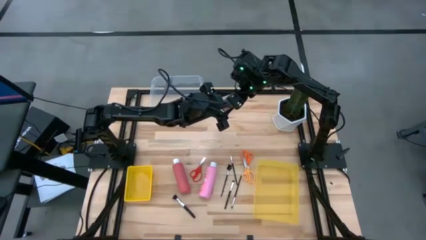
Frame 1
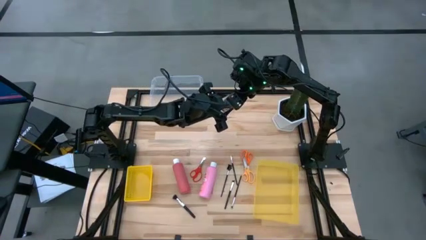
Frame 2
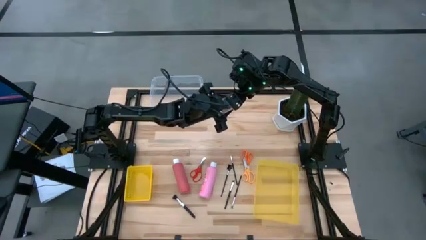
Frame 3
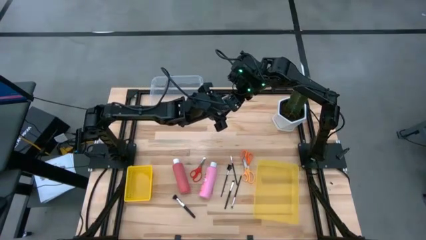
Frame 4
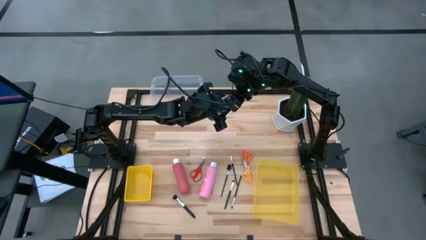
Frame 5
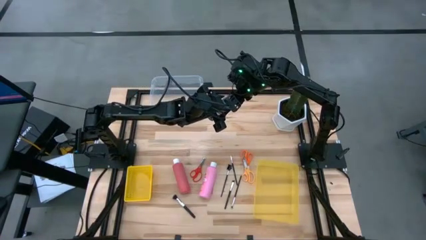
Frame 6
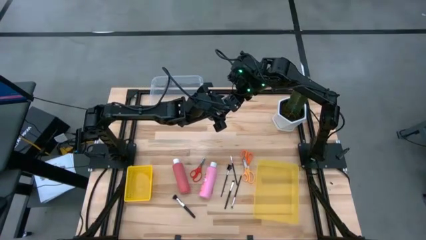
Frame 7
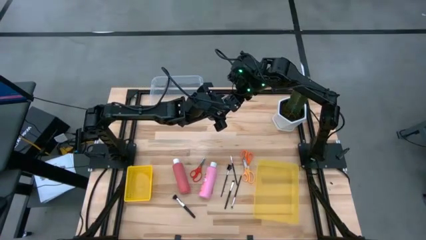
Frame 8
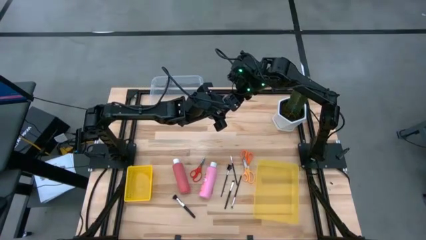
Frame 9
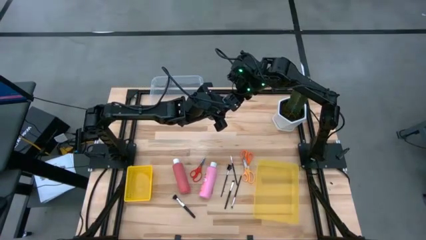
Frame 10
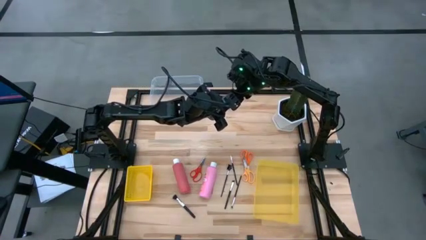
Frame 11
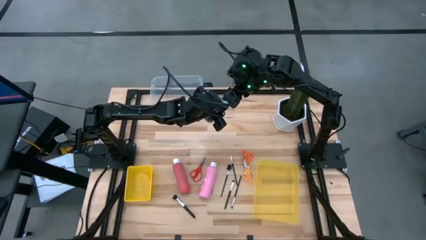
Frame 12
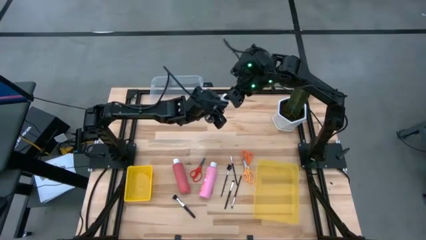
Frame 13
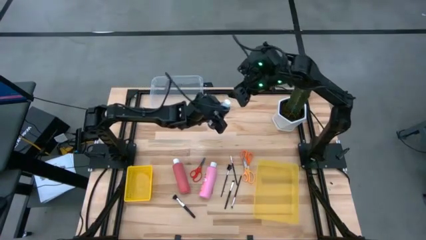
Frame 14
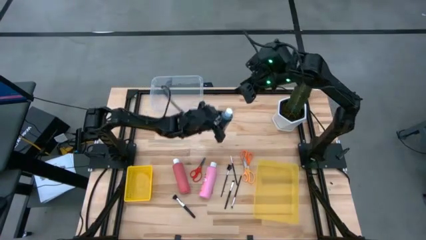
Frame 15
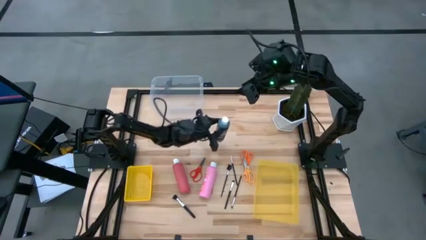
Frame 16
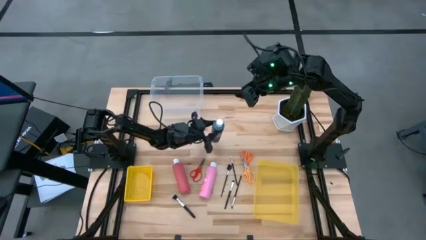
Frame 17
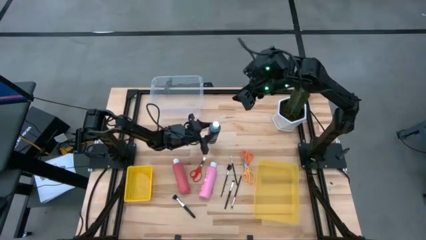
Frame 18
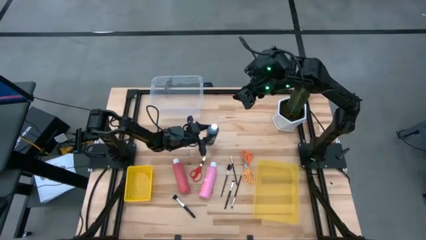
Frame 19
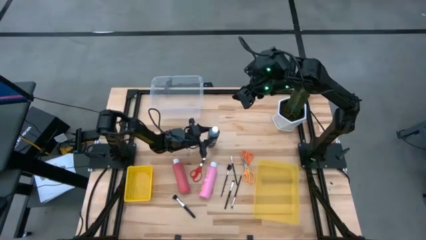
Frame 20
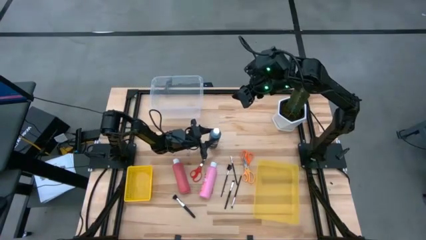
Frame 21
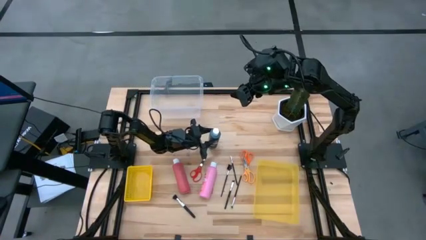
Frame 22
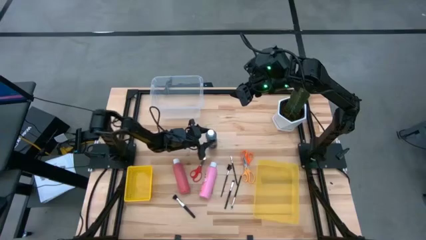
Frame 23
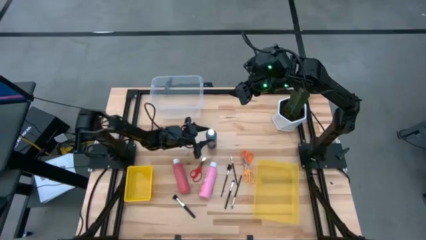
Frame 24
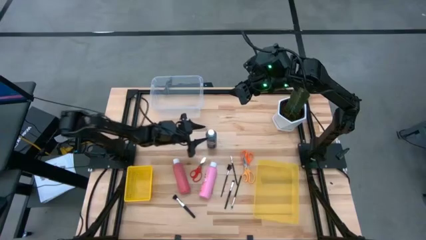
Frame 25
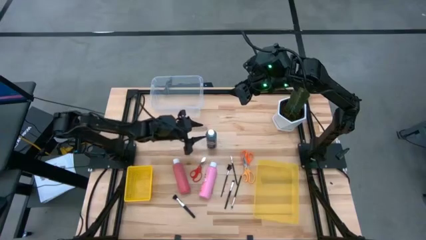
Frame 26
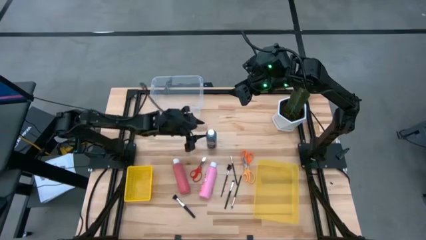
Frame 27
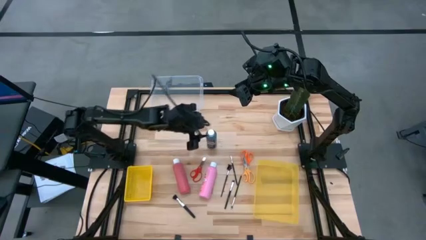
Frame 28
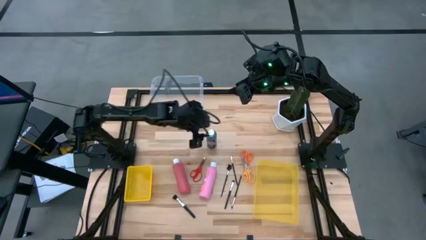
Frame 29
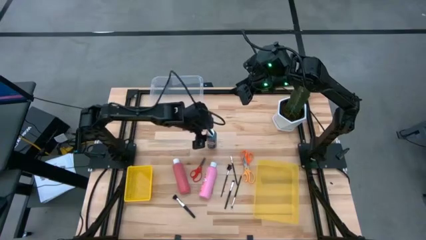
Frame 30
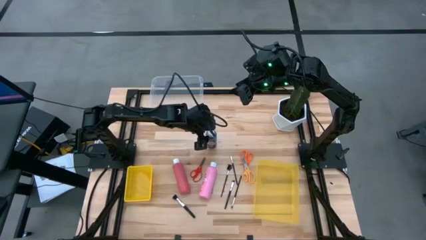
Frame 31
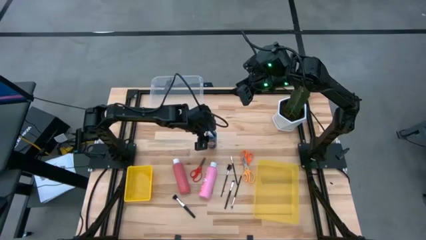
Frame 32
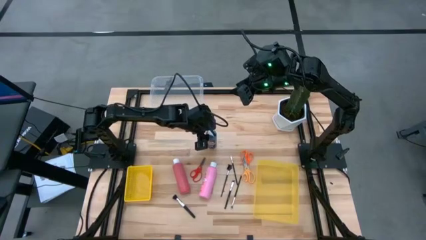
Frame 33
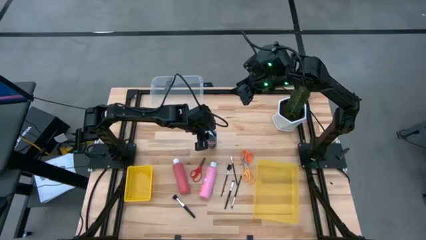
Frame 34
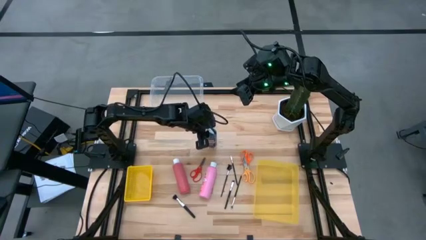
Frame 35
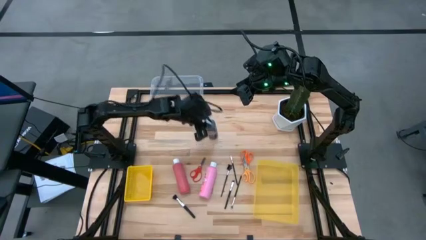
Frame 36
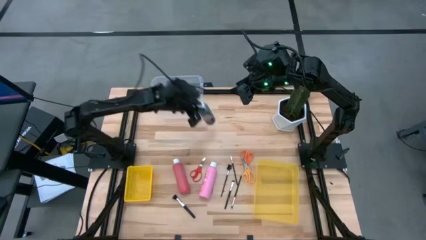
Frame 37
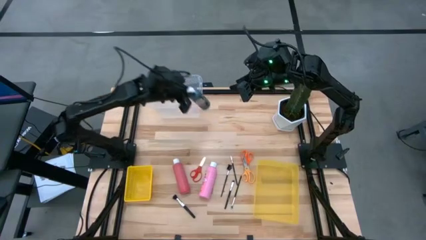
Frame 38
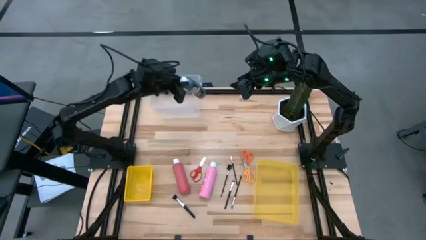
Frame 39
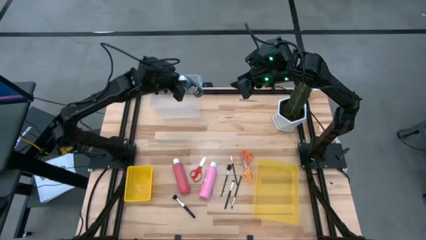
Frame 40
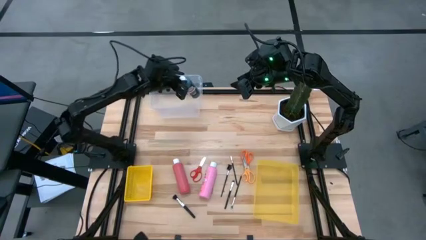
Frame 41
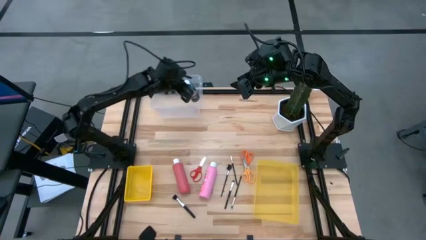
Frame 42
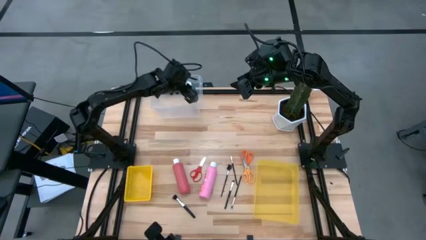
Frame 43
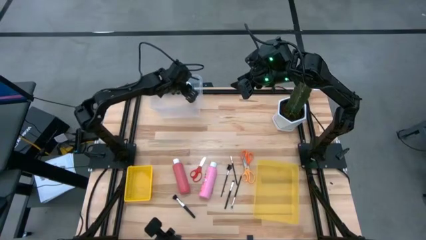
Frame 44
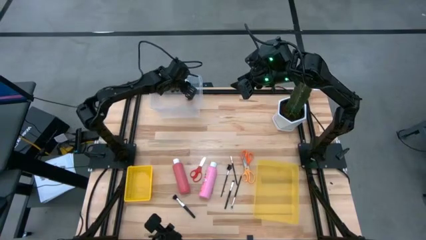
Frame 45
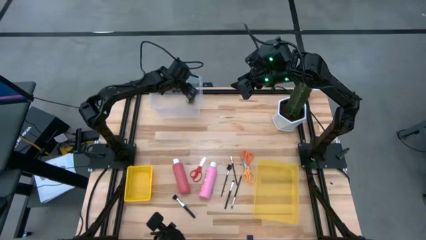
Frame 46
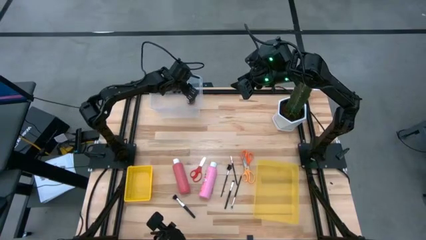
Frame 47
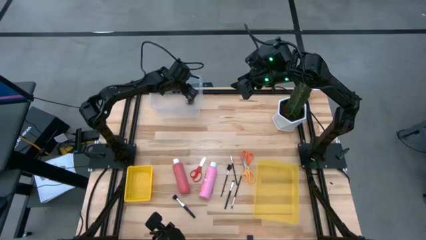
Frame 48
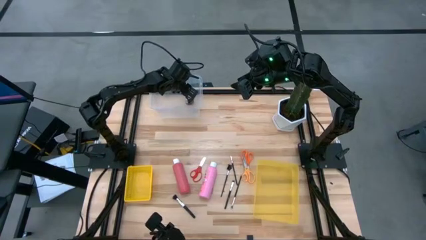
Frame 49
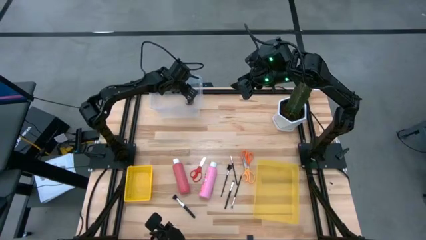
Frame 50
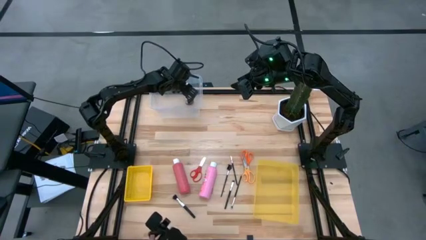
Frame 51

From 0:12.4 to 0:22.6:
Task: Pick & Place Paint Supplies
Put the black paint bottle into the transparent bin

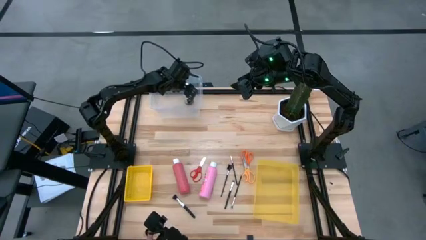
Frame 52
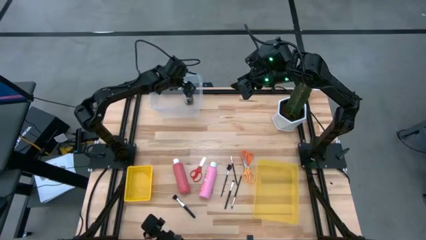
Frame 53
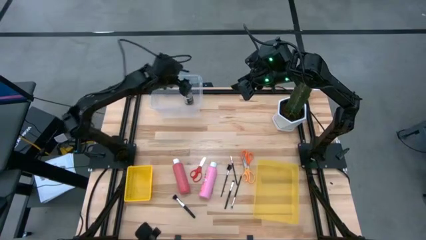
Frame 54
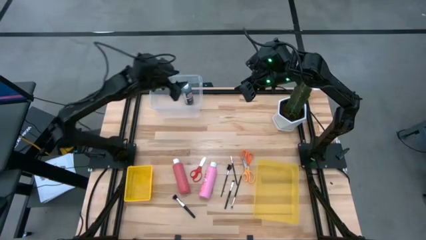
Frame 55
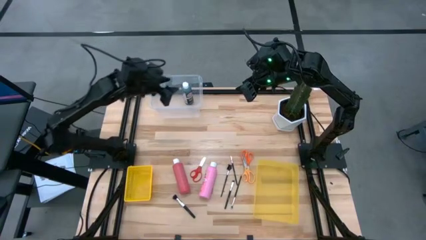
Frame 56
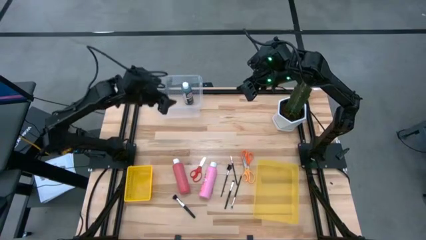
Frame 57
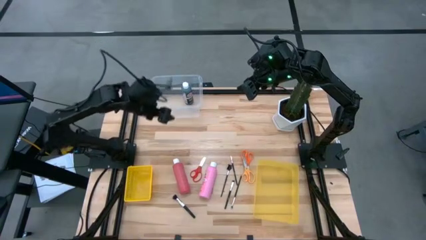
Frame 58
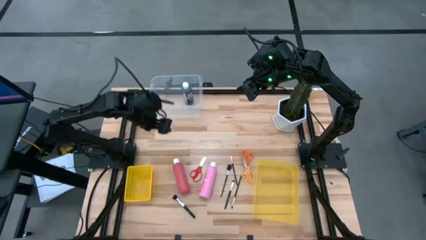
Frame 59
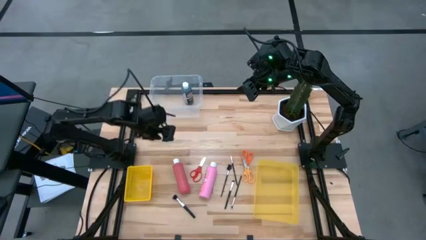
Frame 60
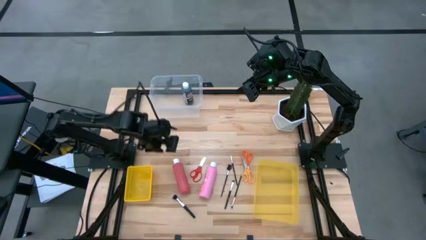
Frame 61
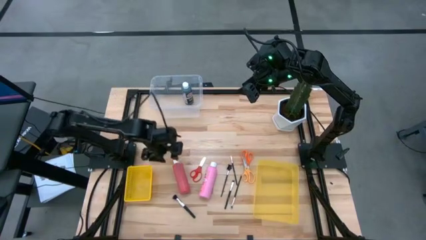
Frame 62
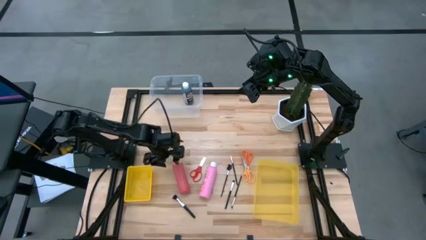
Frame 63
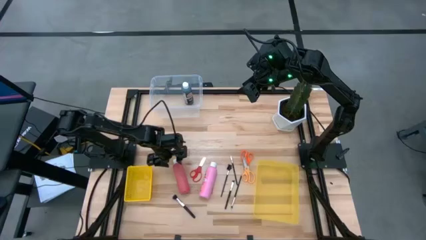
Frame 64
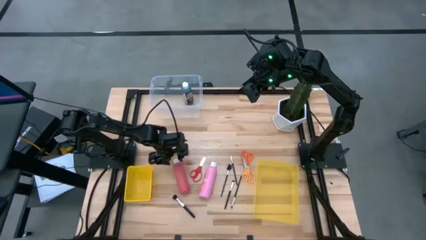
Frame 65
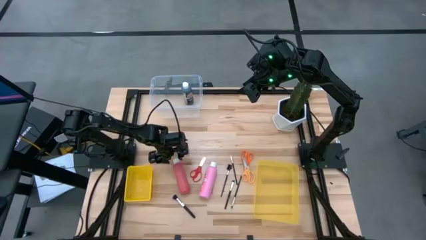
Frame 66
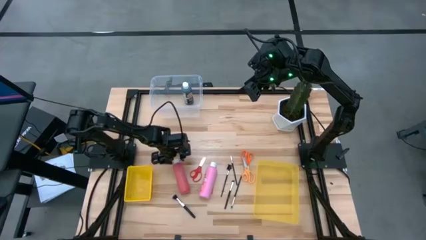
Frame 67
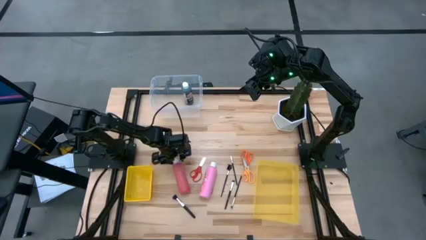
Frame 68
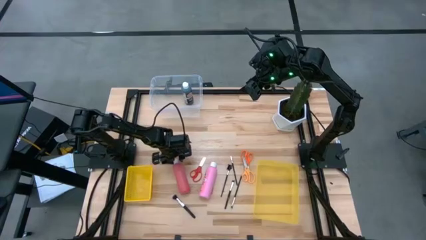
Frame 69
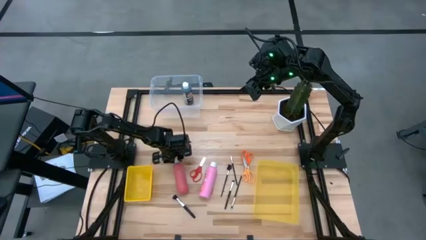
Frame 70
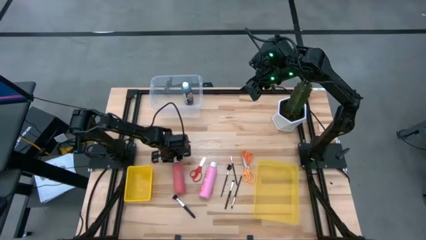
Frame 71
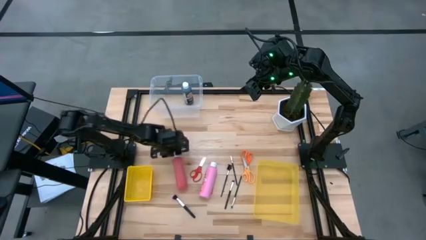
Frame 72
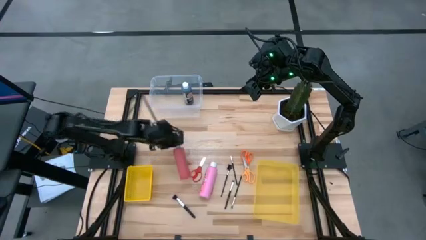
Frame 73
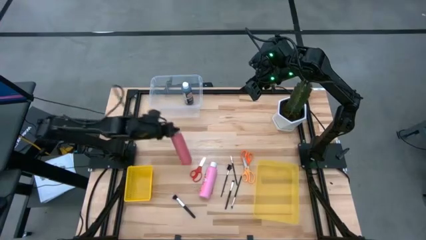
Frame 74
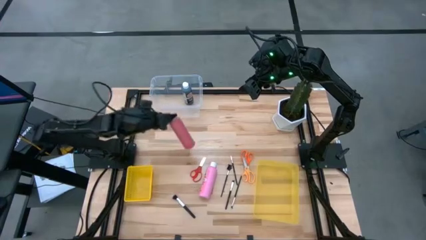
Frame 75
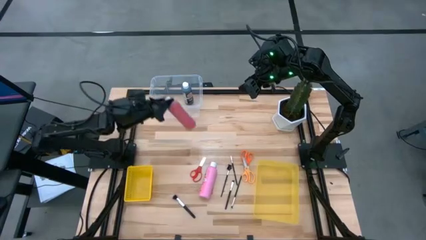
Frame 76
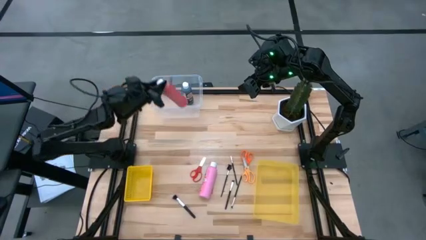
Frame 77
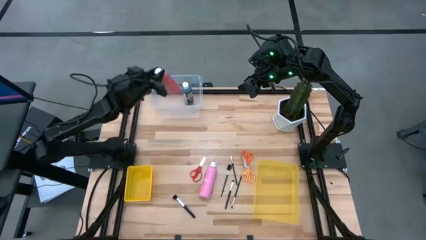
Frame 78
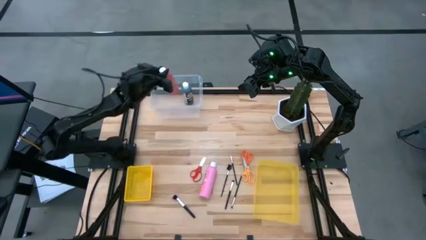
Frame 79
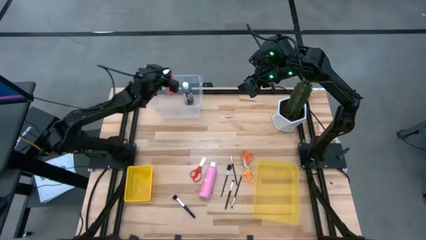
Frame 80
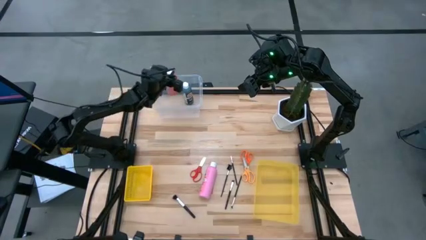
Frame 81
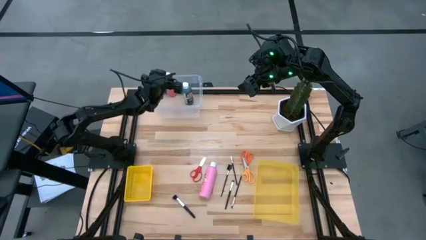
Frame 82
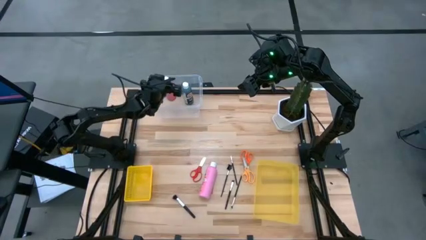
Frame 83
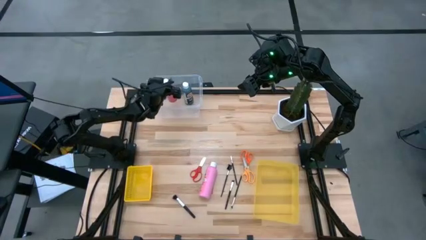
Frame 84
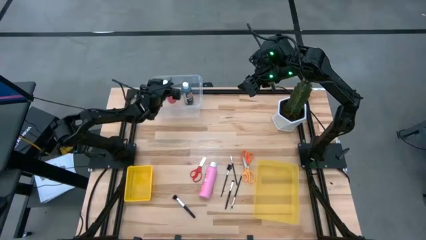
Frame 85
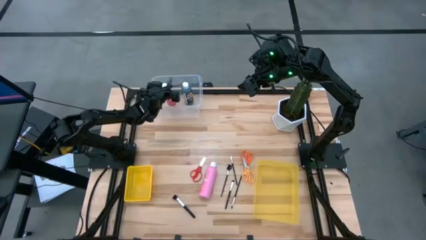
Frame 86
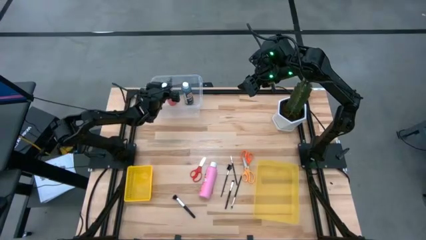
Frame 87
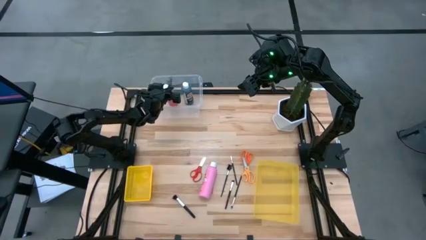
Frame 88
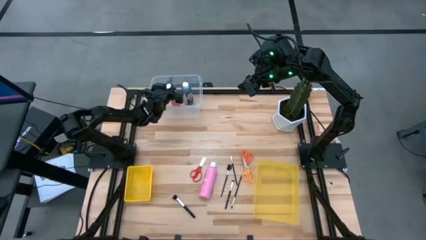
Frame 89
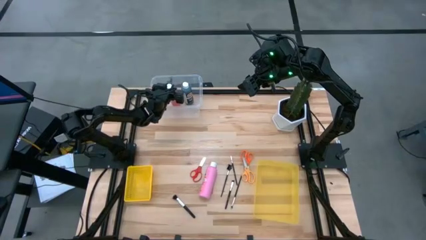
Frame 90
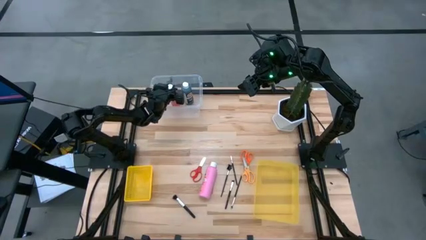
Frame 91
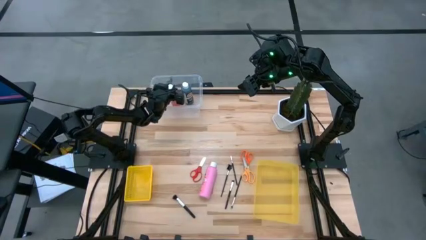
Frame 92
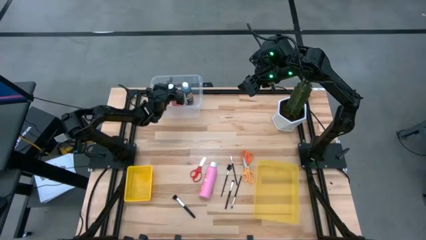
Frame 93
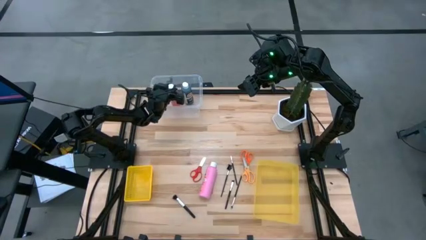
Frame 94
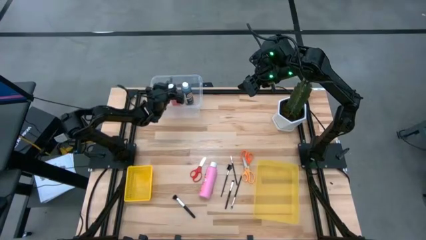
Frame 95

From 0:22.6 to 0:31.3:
Put the red paint bottle into the transparent bin
